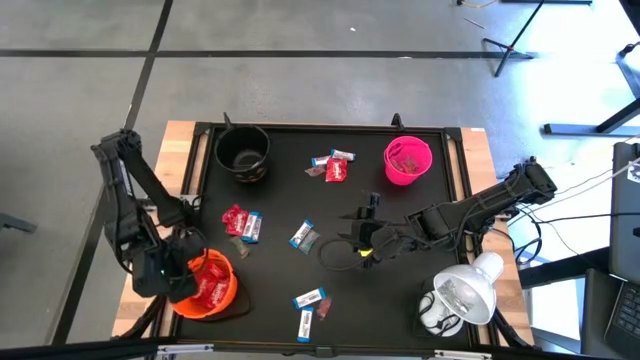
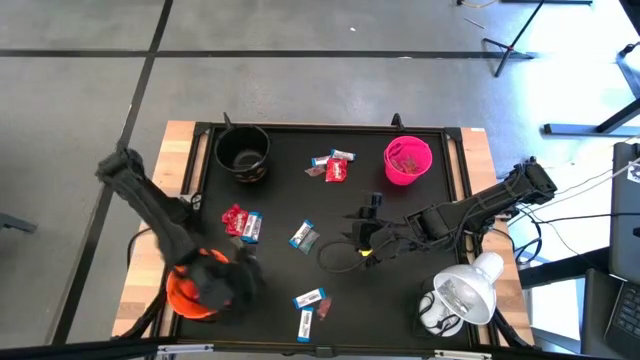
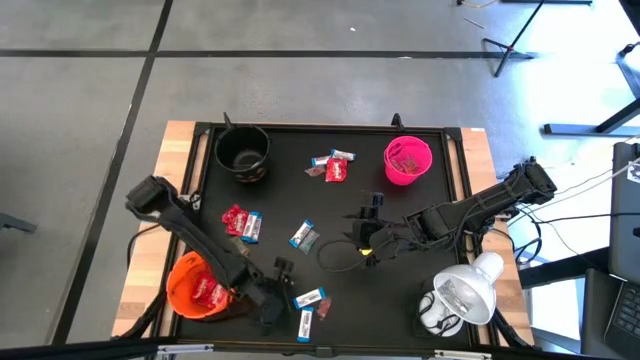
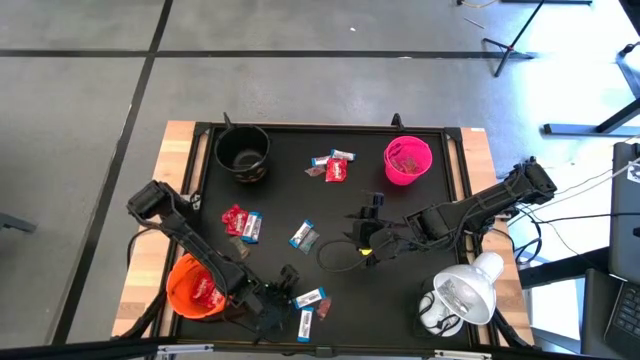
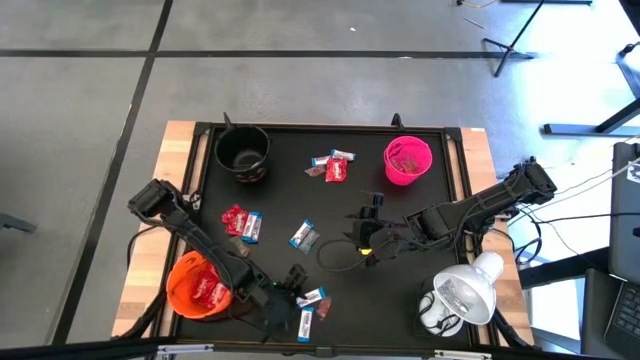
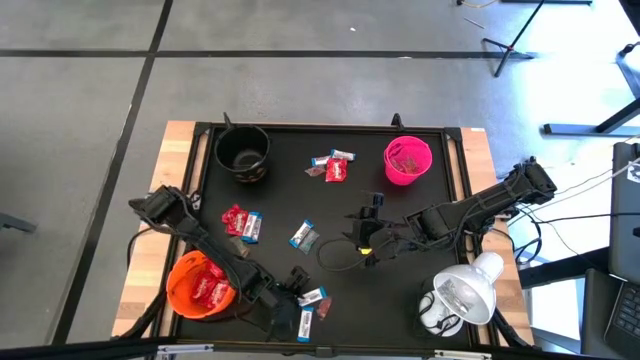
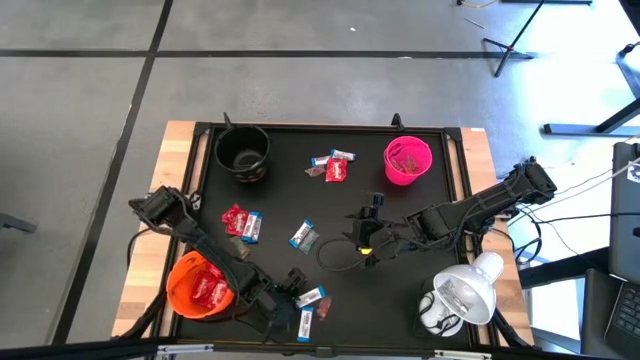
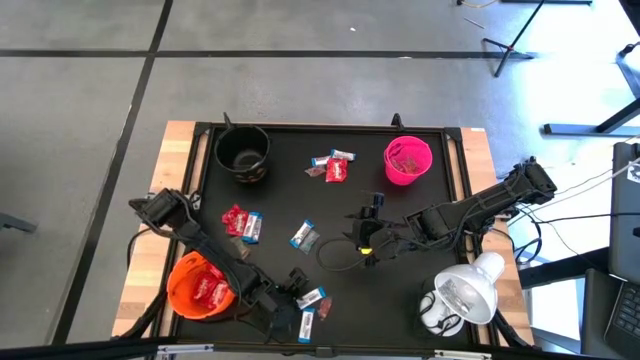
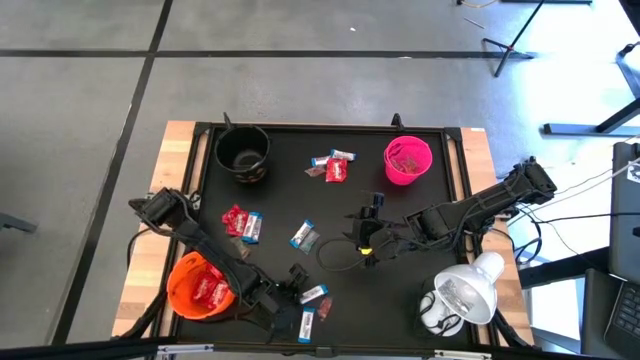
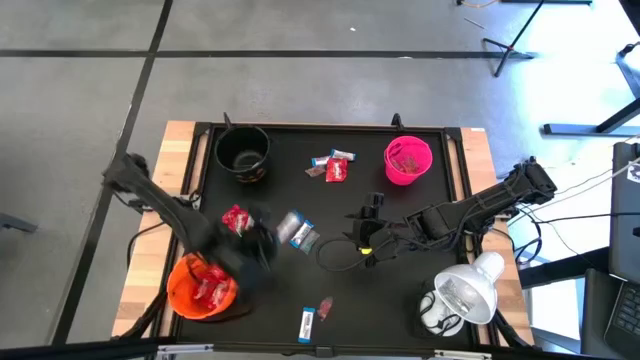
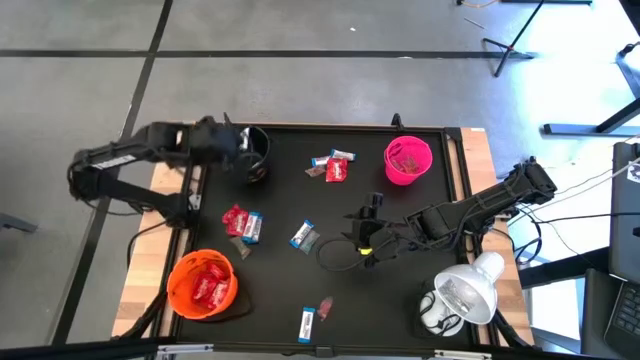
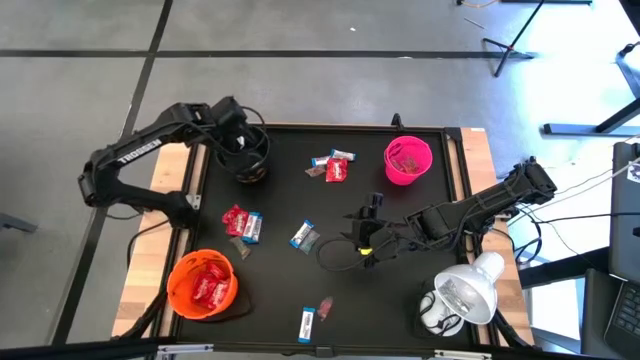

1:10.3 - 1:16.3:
Task: Sort candy
Put the white chocolate bar into the black bucket

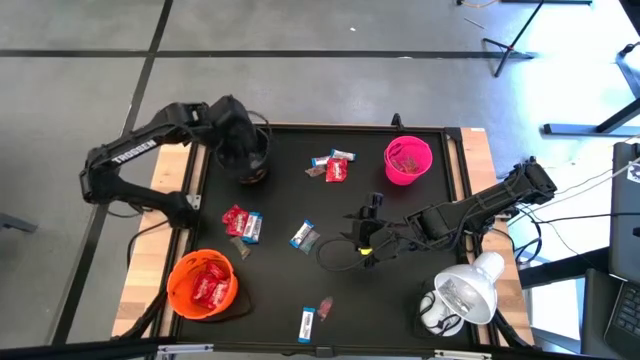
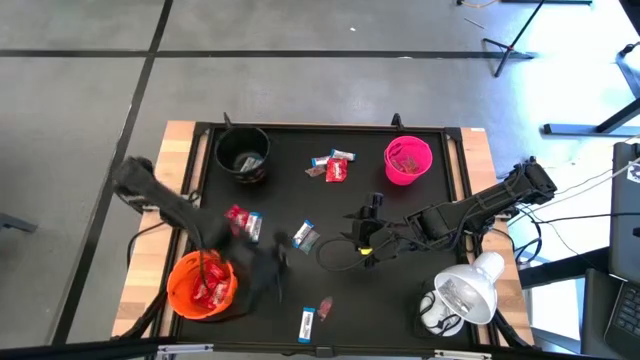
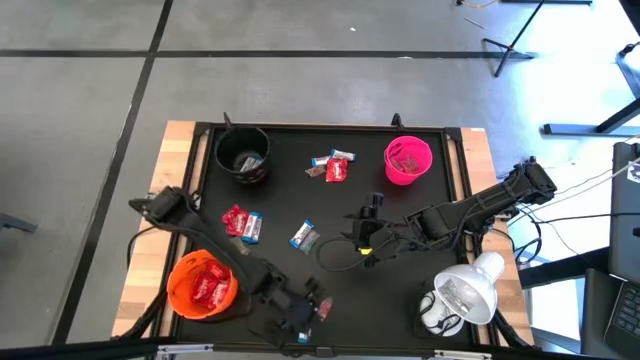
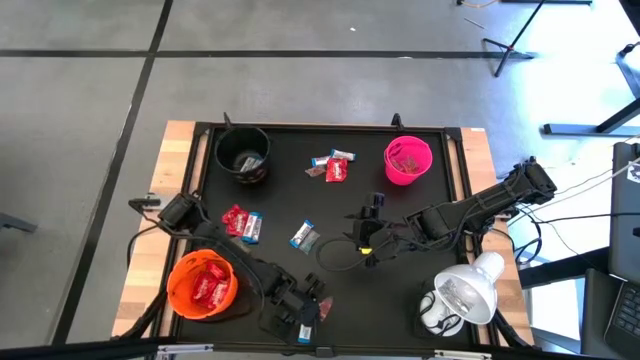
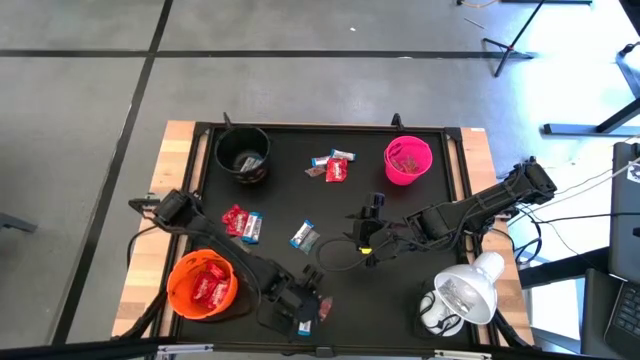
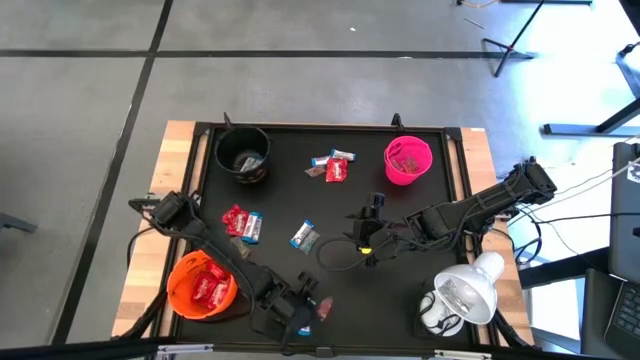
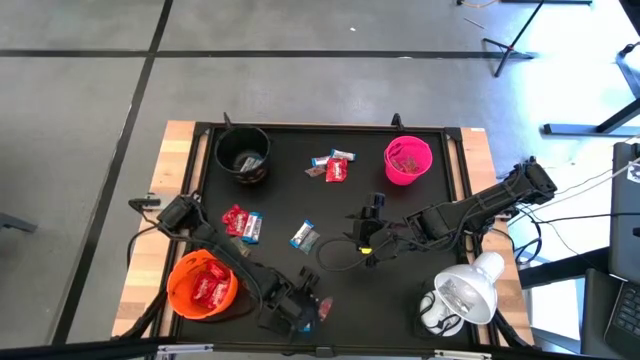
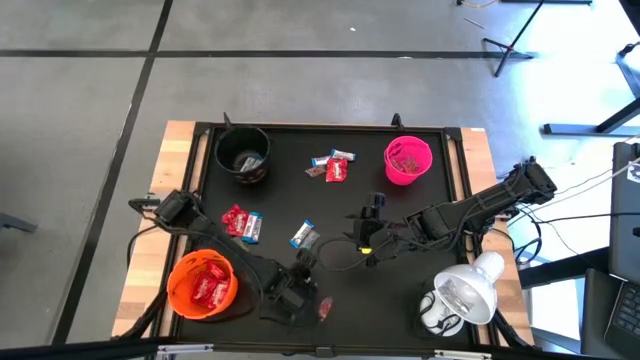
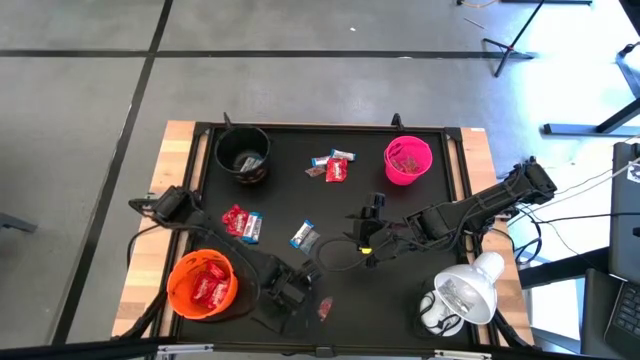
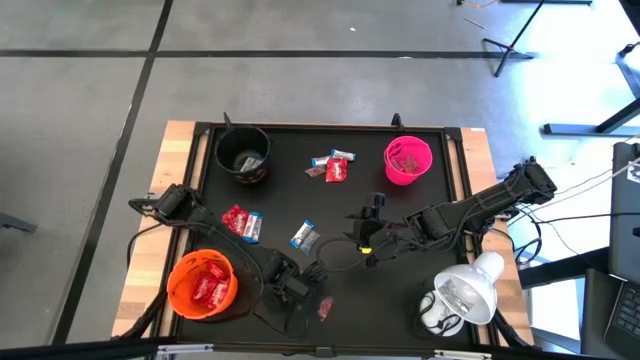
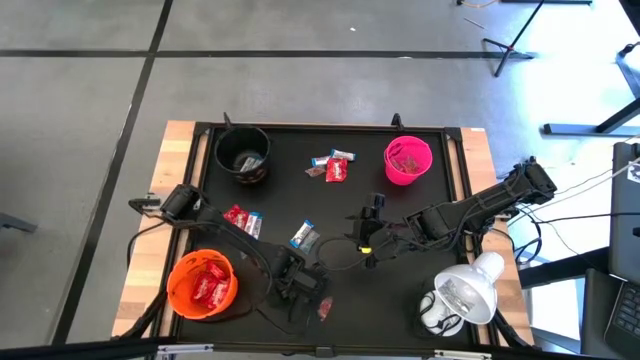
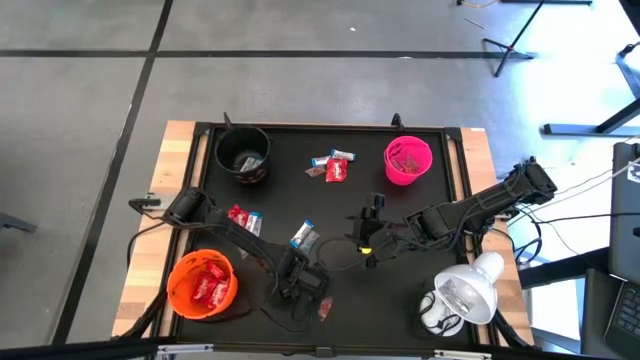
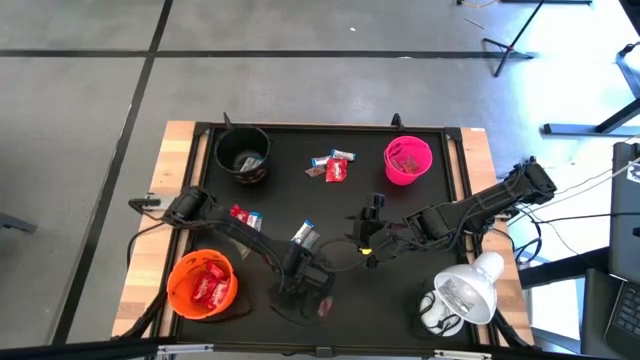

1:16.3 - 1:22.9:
Put the white chocolate bar into the black bucket

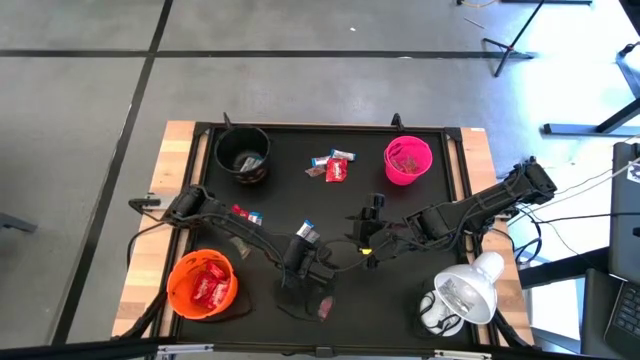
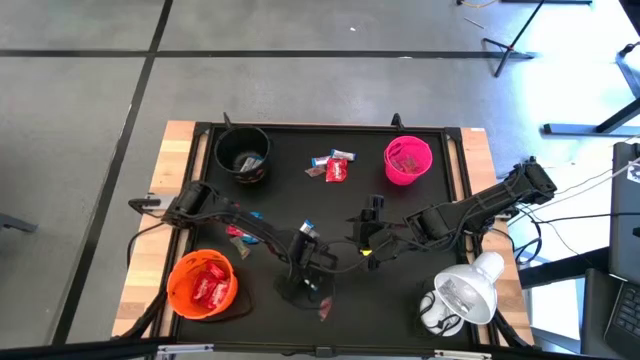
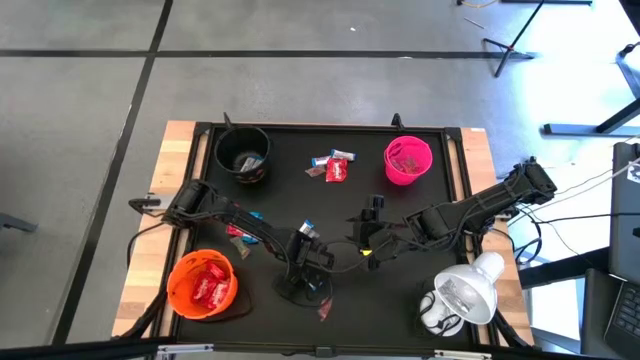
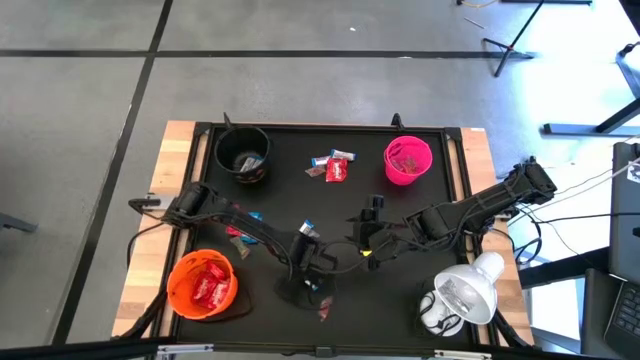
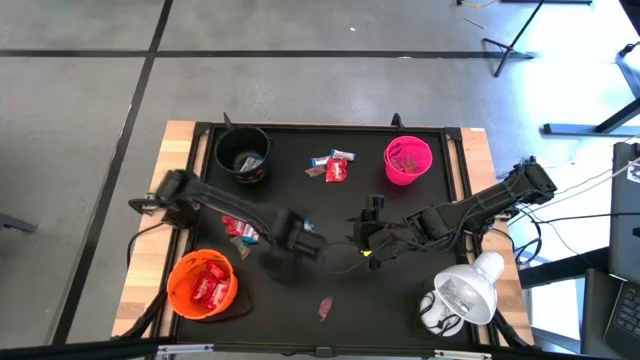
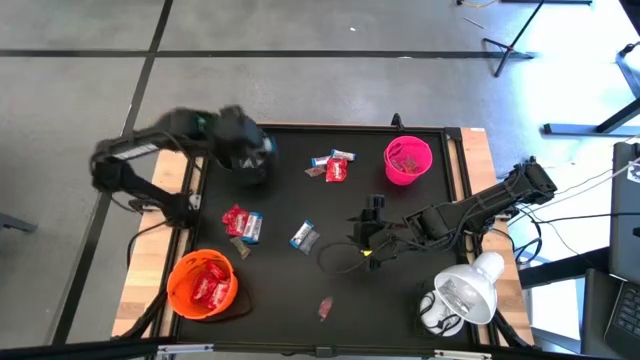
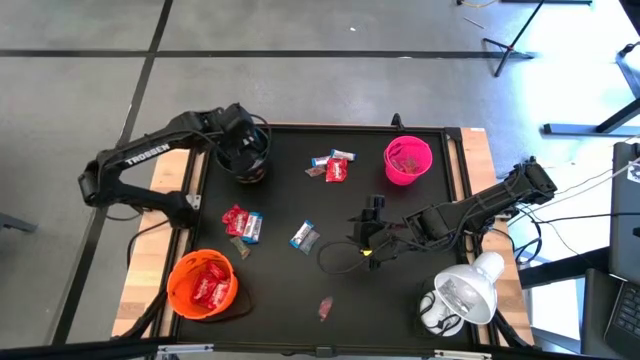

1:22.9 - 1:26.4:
Put the white chocolate bar into the black bucket

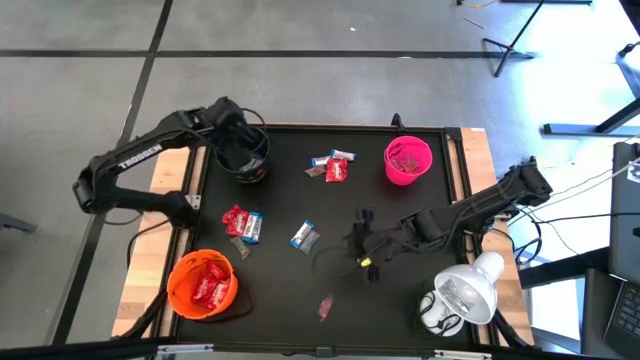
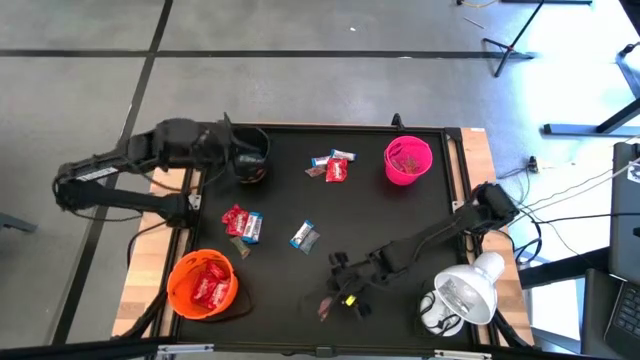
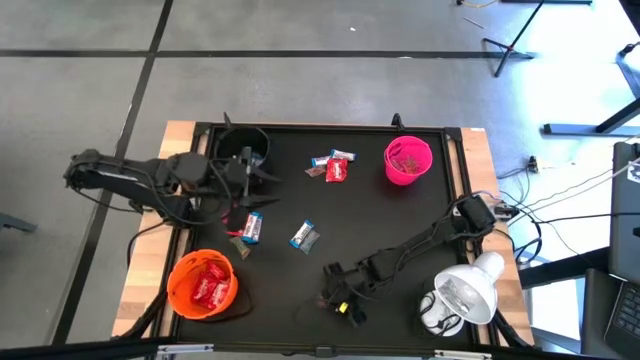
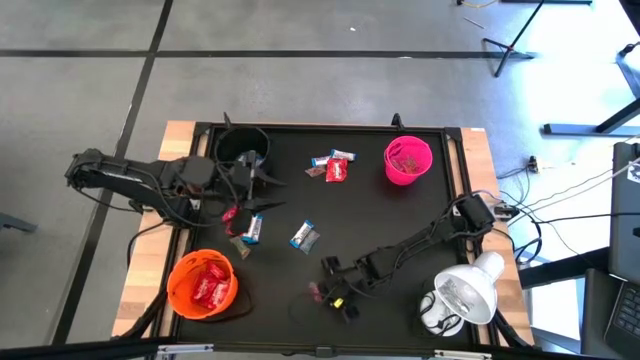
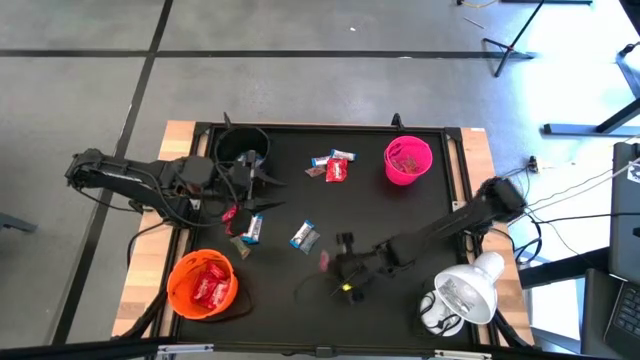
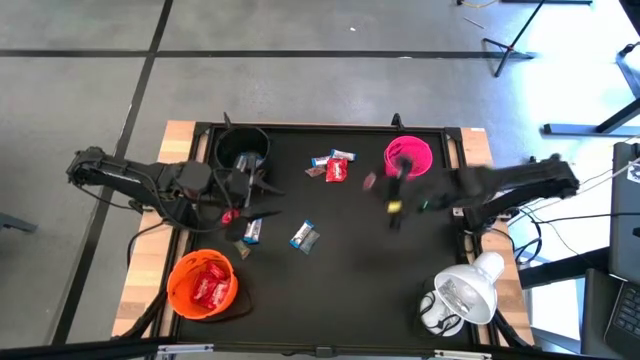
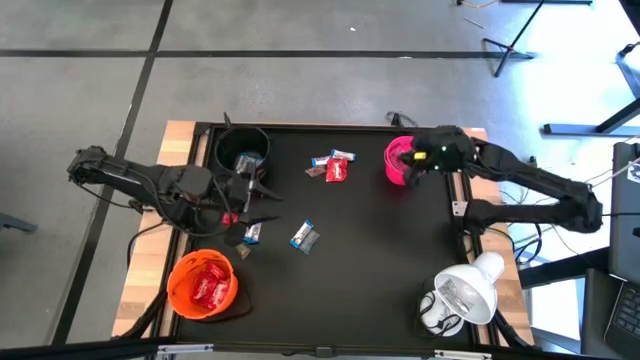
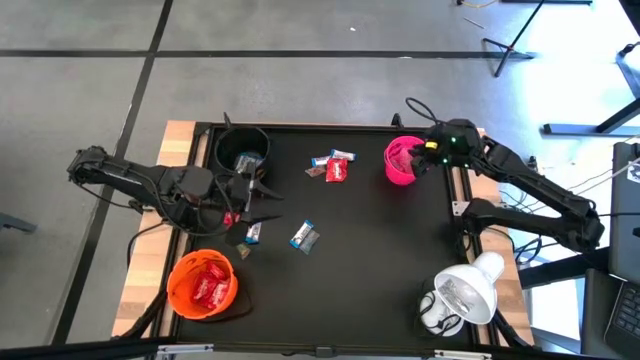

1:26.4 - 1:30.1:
Put the orange gummy into the pink bucket

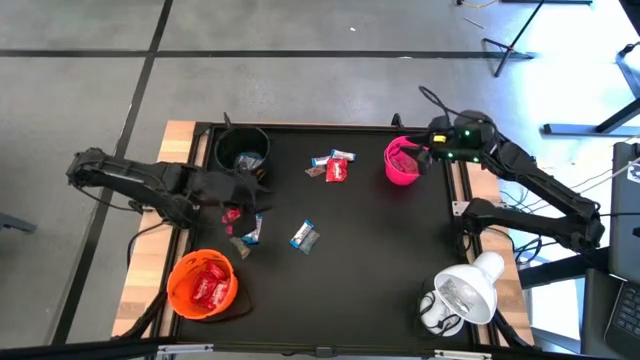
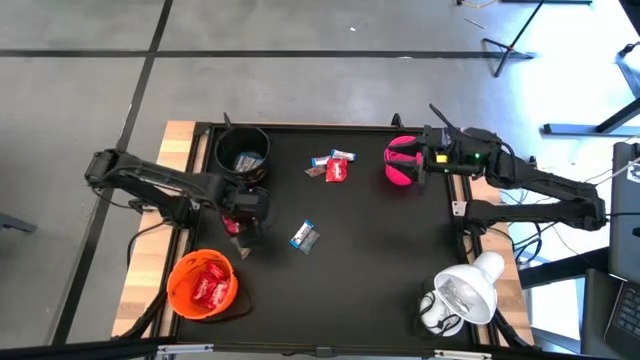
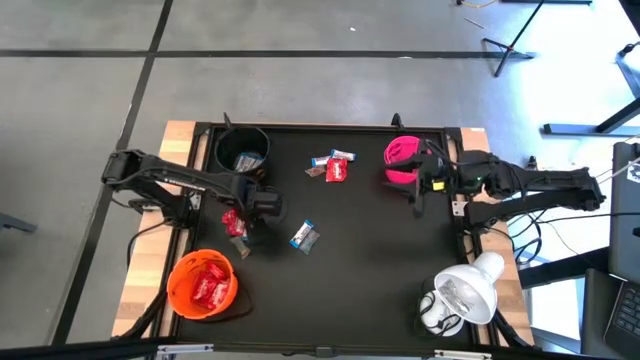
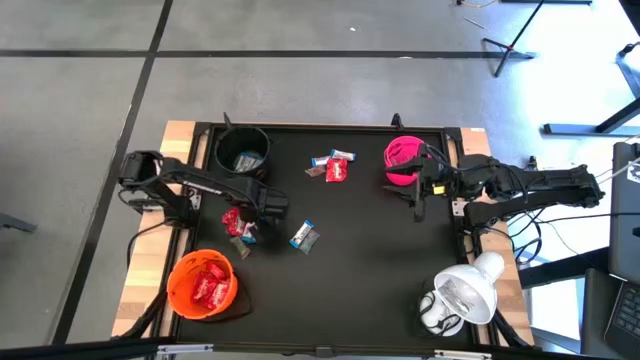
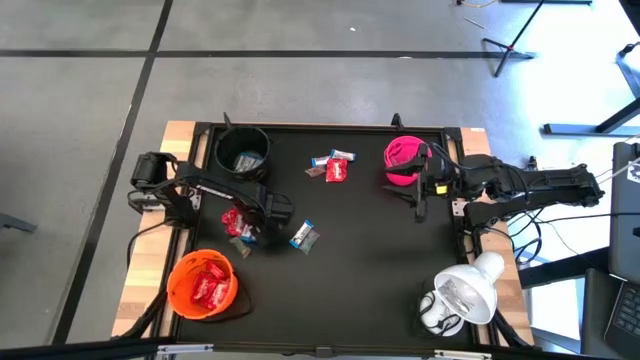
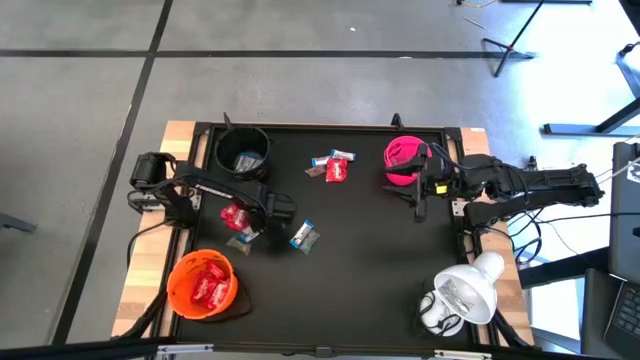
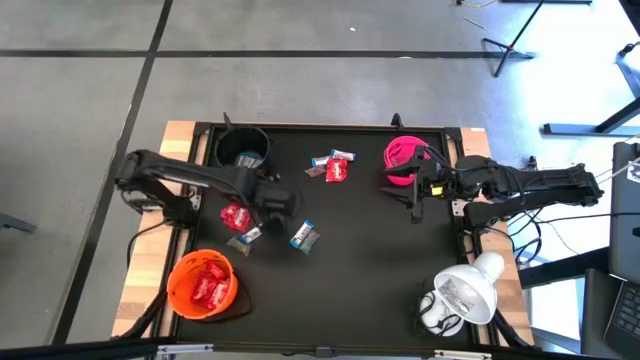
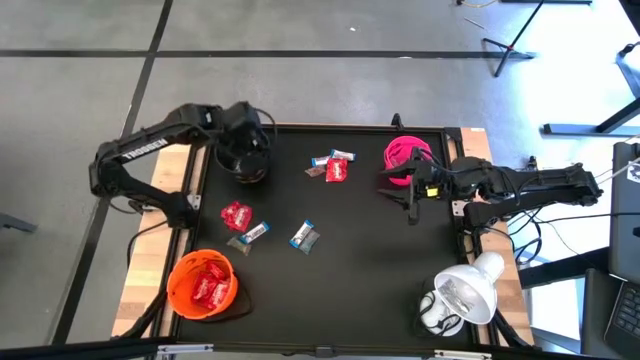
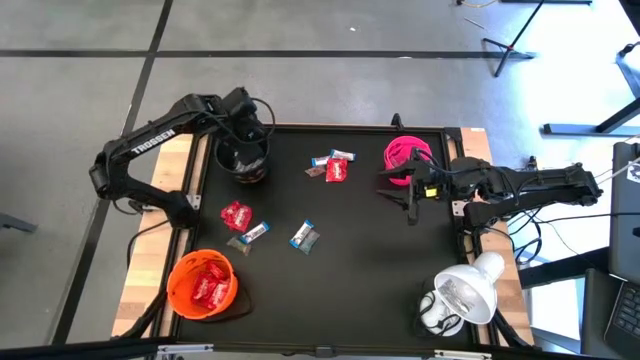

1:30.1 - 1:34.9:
Put the white chocolate bar into the black bucket
